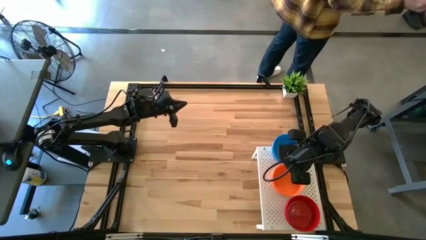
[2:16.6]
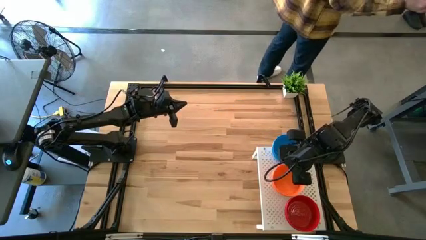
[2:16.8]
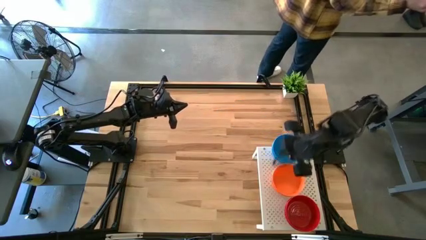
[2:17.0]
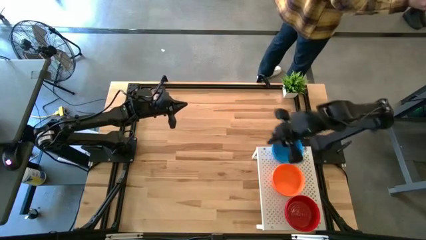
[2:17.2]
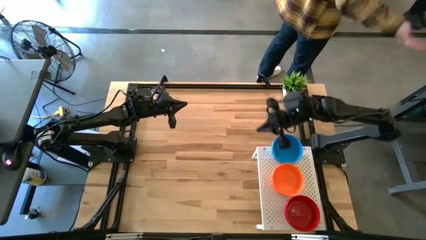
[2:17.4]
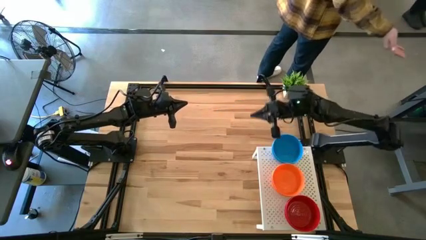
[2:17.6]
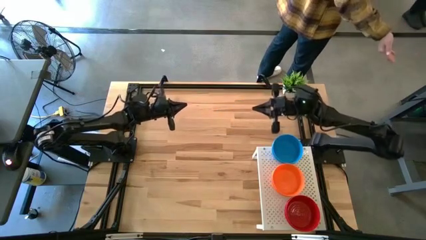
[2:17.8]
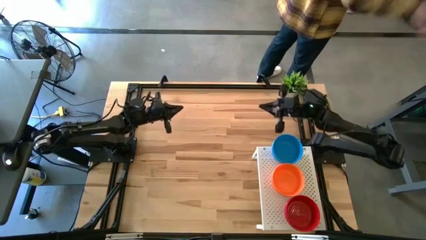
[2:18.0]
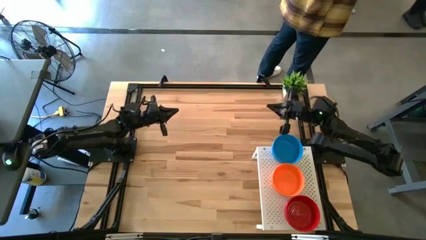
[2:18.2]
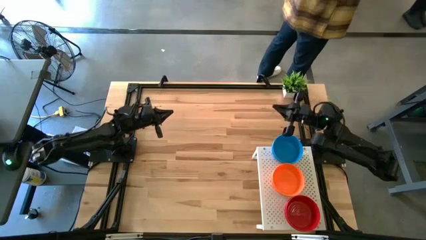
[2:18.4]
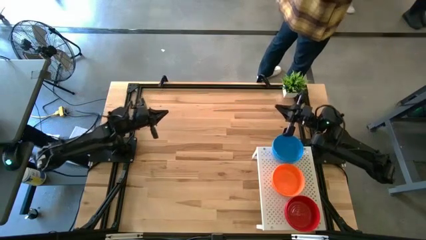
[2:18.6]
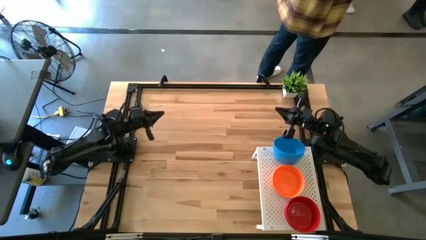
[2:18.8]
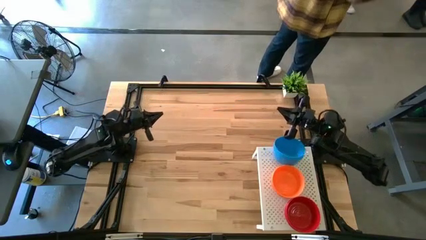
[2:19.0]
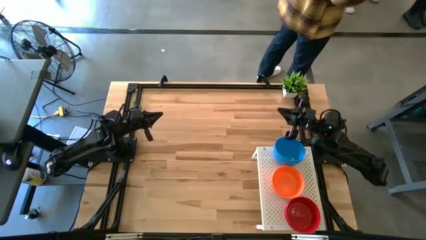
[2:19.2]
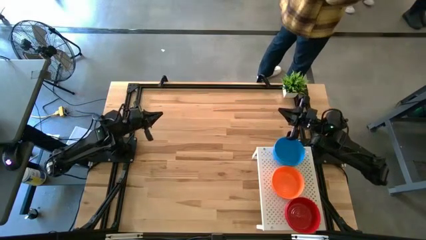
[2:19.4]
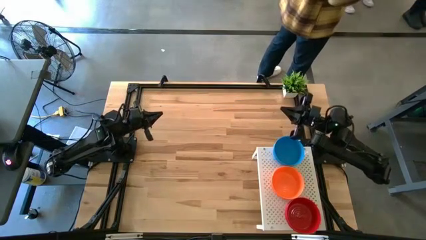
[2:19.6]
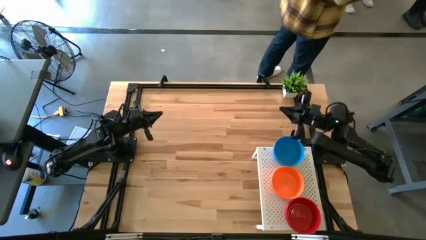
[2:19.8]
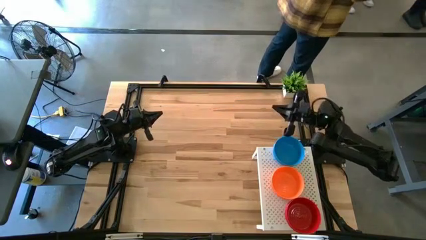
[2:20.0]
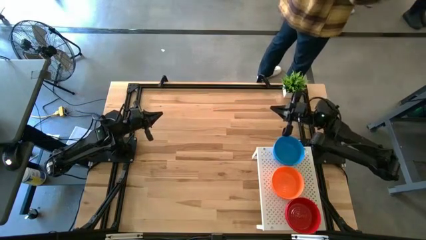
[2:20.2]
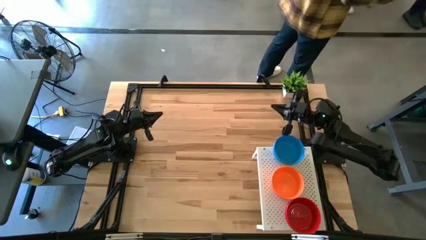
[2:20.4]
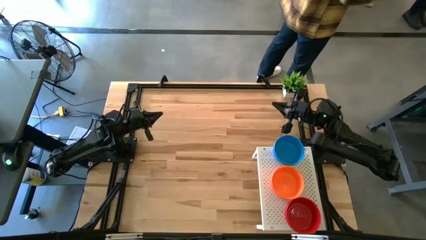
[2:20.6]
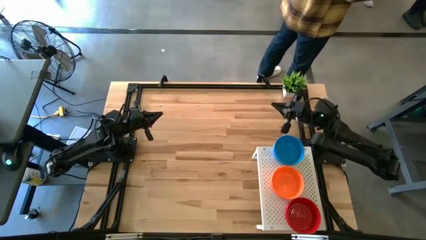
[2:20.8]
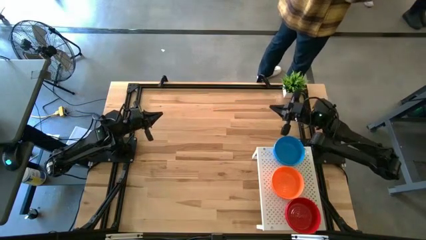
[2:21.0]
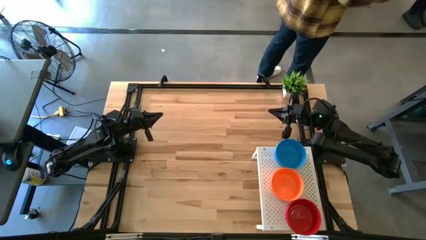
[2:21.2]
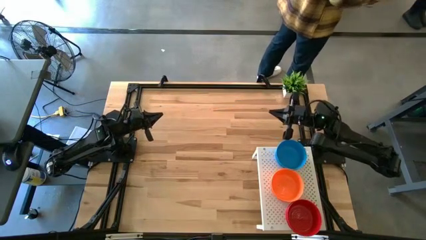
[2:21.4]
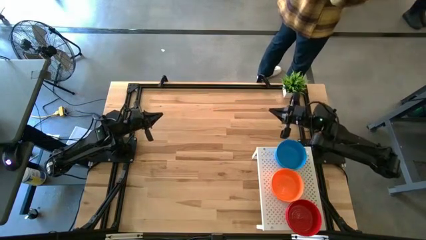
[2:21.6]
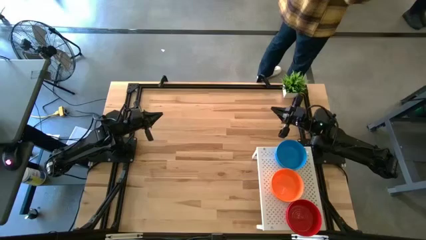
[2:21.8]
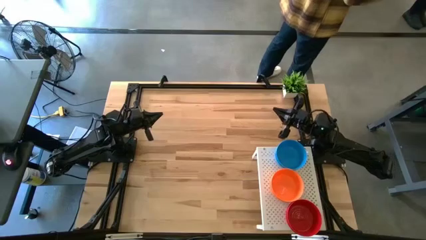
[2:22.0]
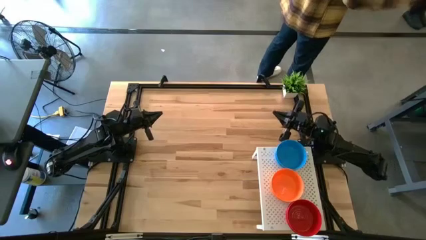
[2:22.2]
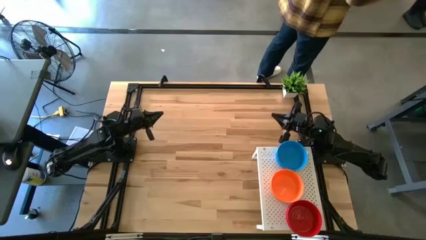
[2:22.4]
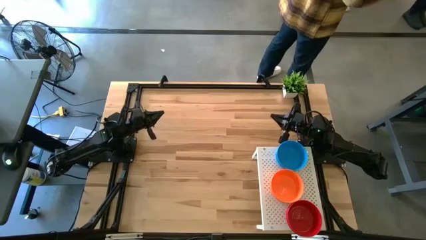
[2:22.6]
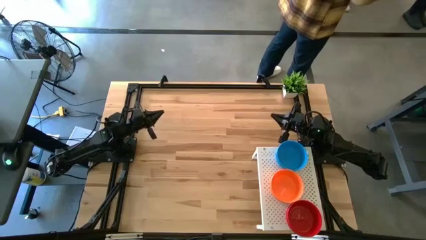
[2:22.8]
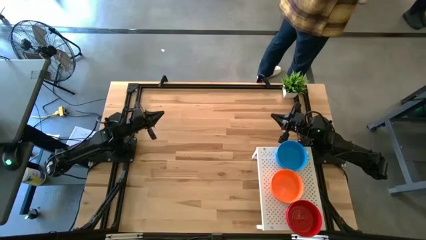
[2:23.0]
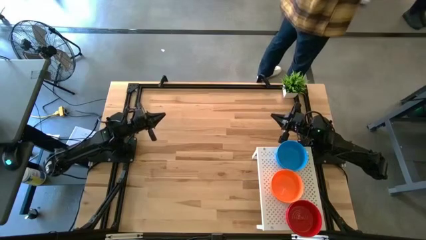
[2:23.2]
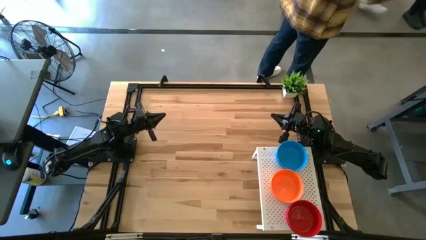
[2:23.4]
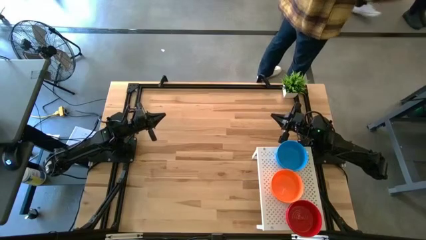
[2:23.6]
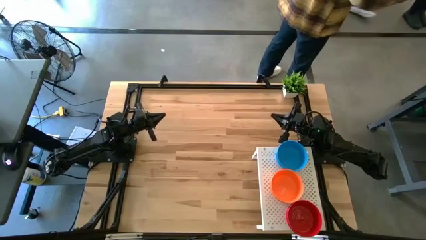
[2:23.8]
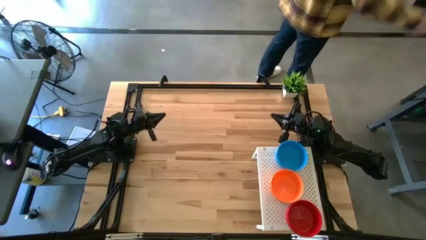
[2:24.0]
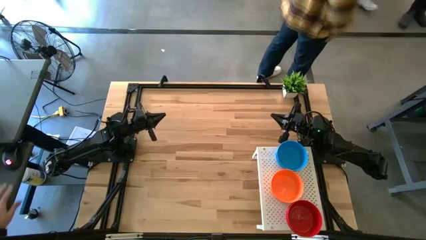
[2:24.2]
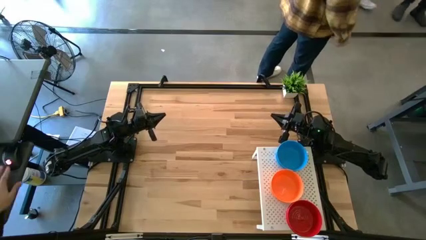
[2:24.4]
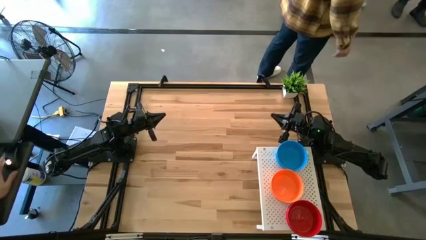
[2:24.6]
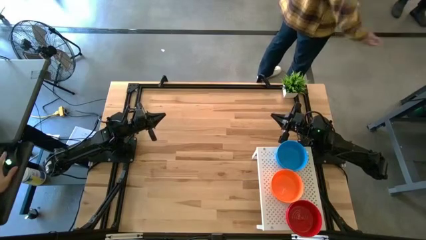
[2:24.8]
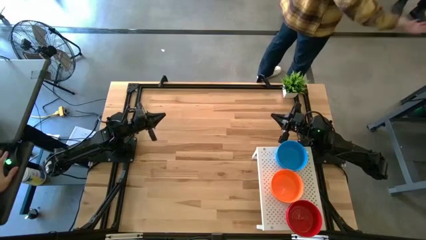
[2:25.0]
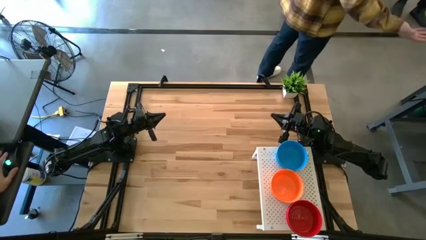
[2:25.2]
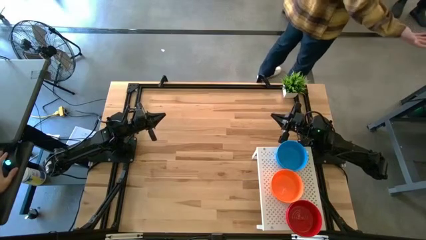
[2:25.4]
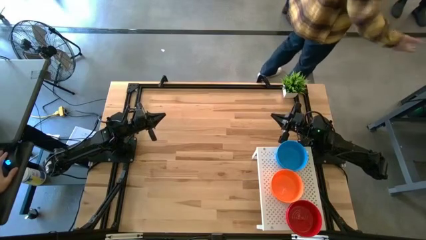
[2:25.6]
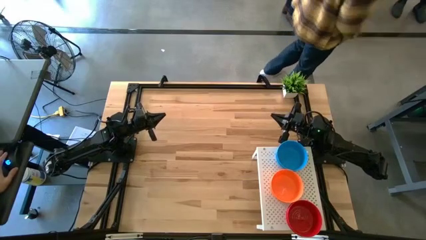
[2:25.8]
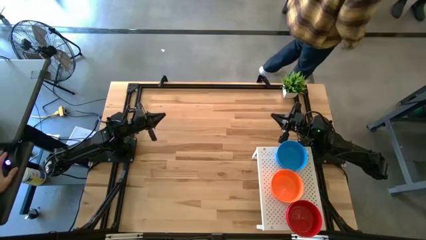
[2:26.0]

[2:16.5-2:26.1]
Task: Pick & Place Mini bowls
Return to Home Position

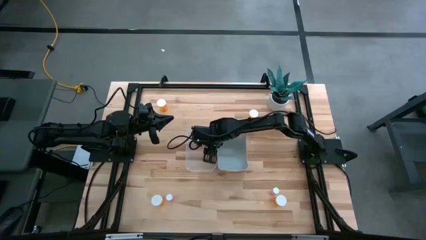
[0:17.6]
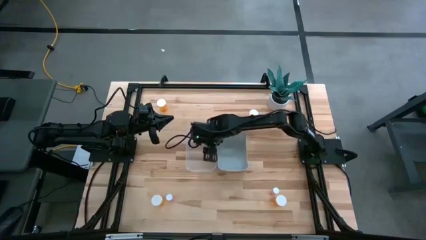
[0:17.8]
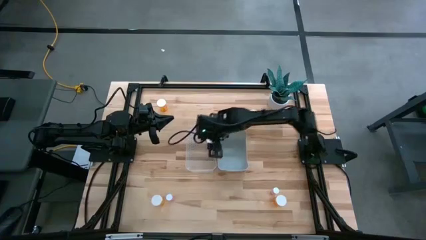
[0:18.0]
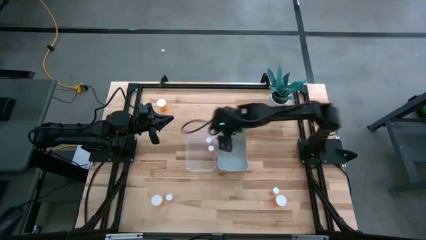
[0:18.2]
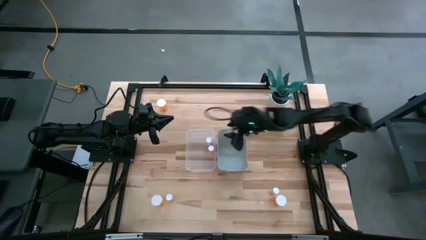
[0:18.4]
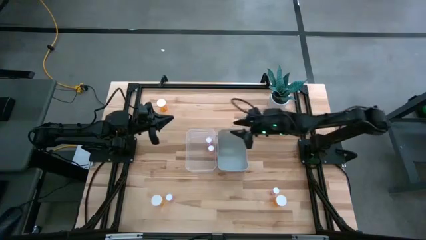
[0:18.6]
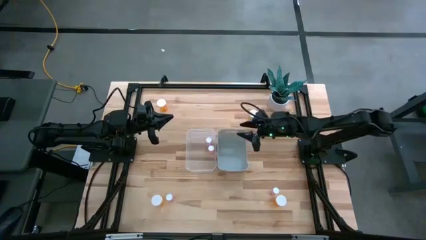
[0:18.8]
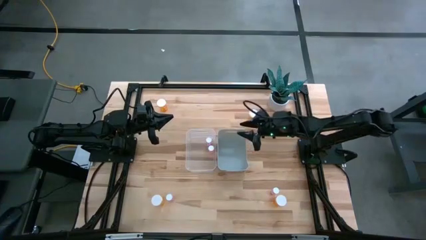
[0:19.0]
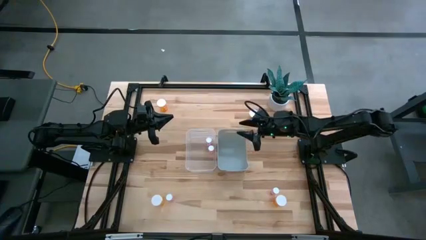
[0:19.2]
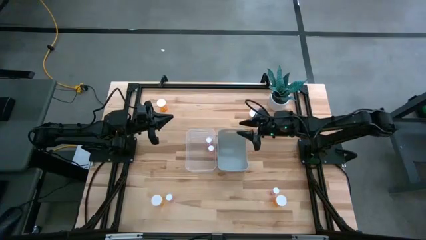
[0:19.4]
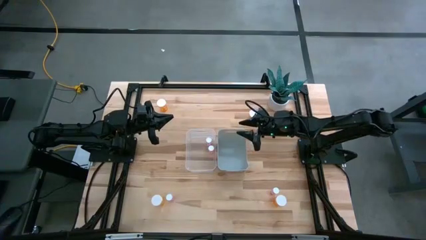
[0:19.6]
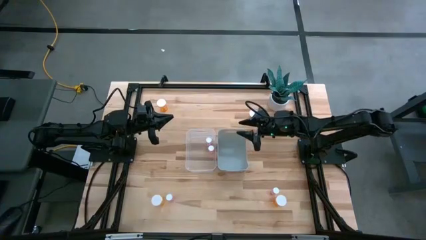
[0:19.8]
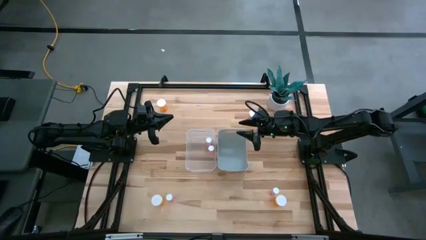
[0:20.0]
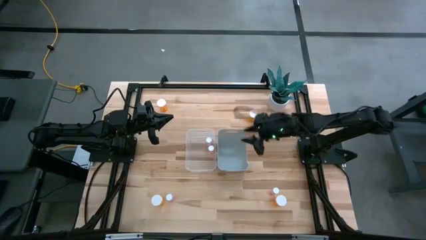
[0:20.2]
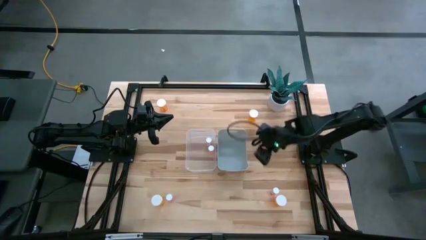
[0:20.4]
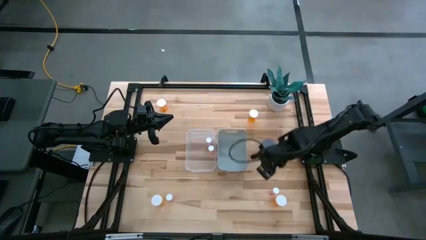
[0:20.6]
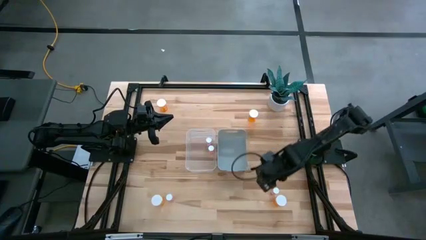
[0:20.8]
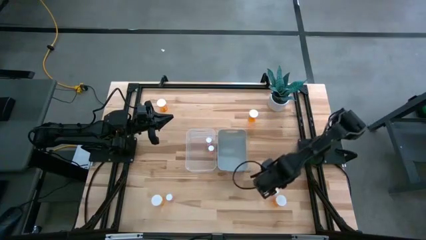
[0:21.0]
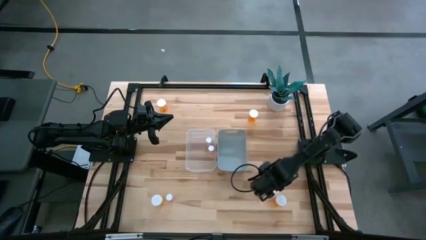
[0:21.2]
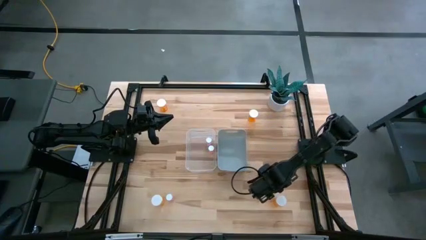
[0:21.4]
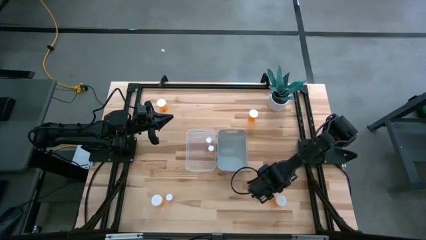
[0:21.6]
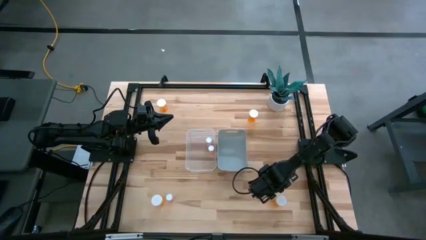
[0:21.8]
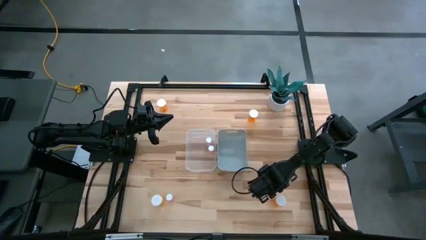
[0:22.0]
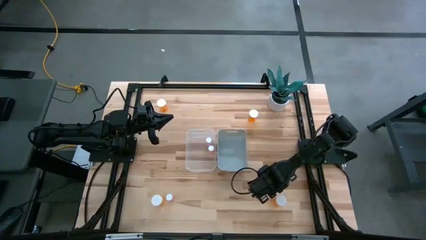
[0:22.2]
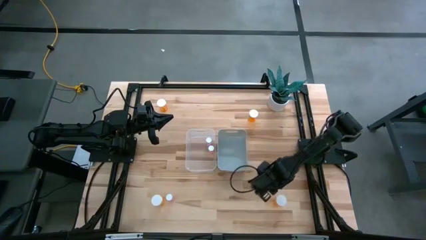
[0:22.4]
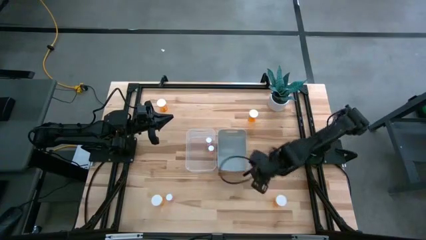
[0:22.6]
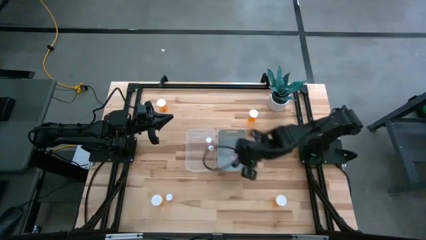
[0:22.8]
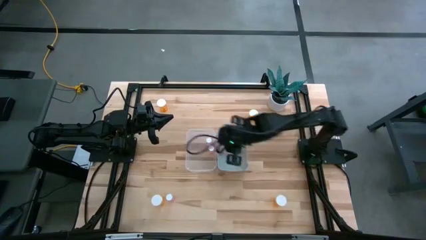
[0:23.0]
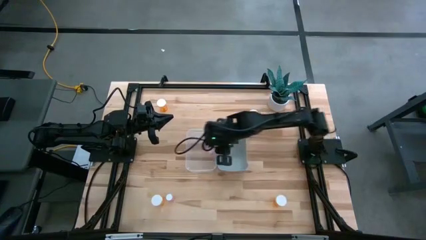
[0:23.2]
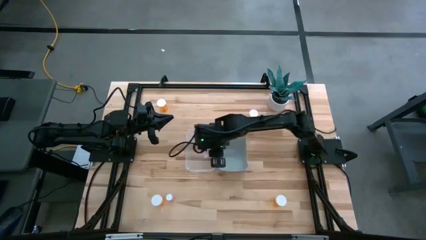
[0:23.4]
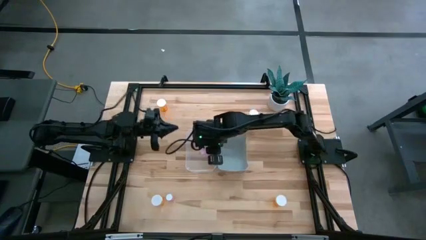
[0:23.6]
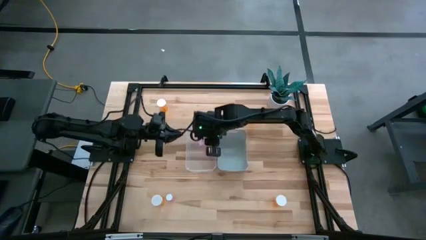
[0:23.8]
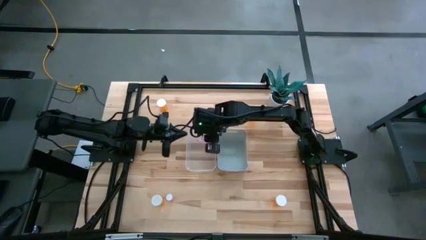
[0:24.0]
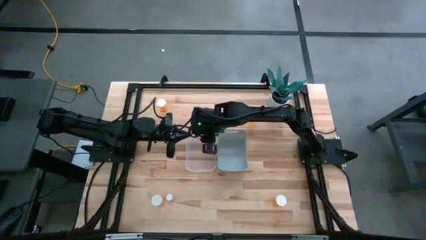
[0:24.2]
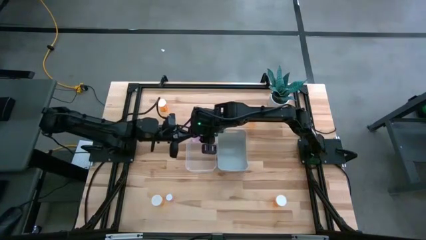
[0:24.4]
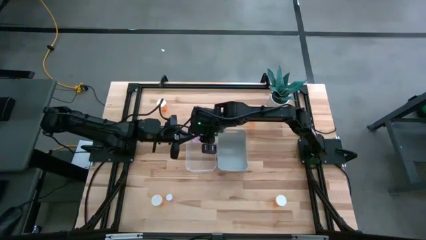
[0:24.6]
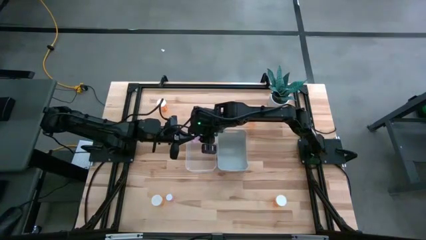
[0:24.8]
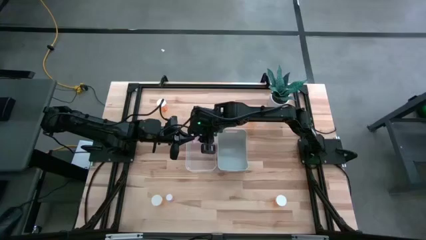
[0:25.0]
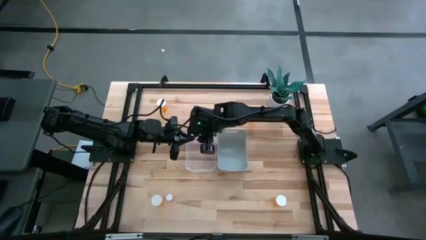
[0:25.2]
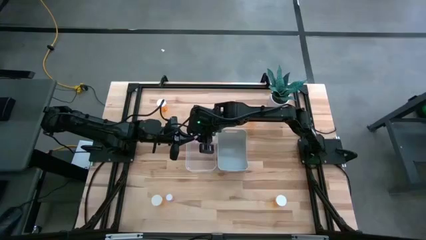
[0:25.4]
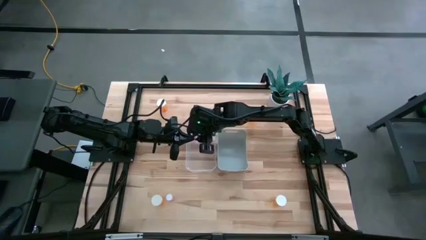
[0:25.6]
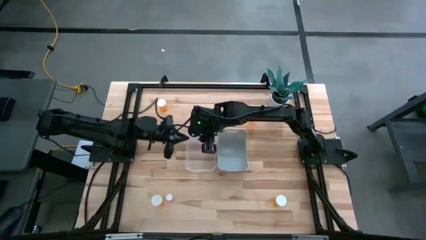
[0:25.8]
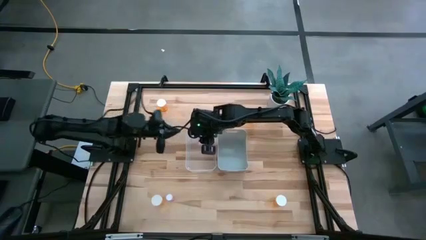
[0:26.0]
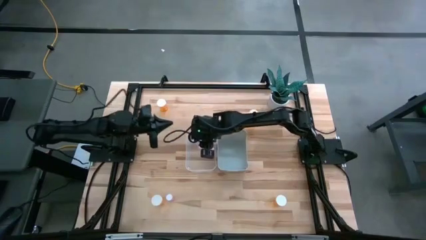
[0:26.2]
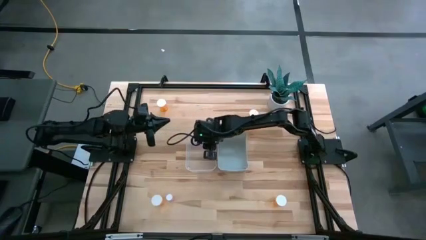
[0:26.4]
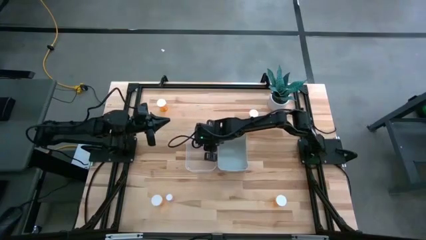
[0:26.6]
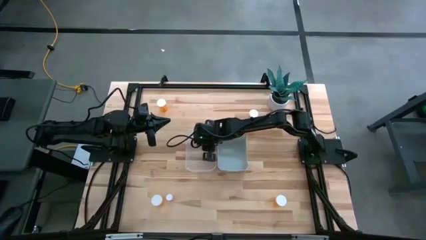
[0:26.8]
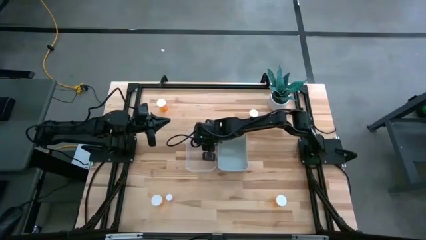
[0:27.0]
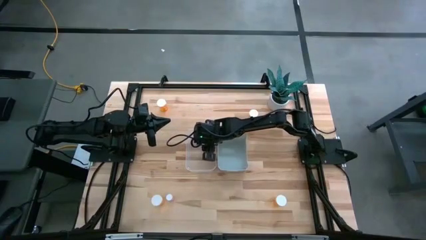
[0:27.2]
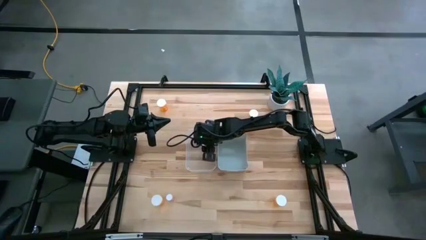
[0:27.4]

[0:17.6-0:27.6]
Task: Pick and place medicine bottles into bin by pill shape (circle, oval)
Put the small pink pill bottle into the transparent bin
